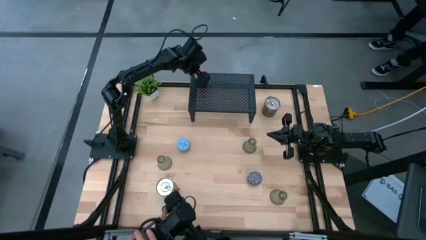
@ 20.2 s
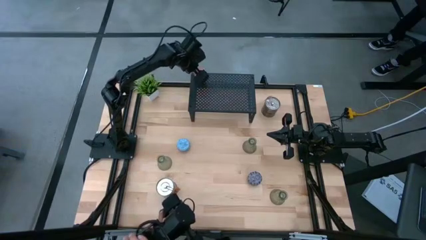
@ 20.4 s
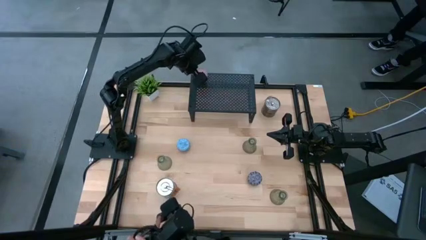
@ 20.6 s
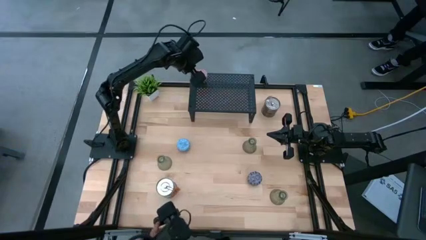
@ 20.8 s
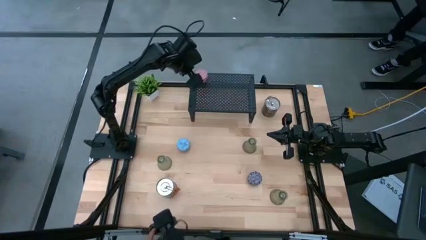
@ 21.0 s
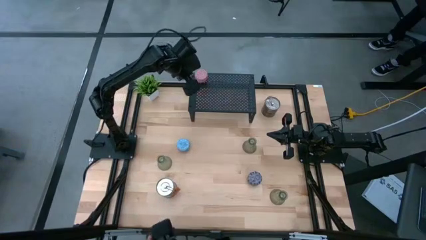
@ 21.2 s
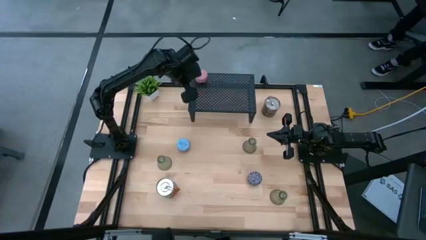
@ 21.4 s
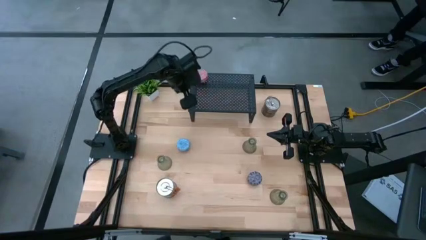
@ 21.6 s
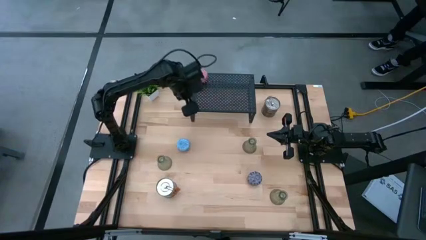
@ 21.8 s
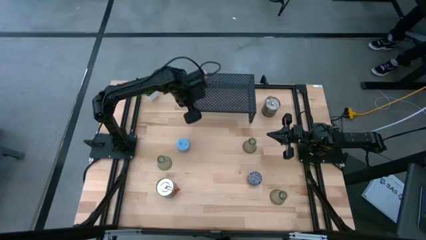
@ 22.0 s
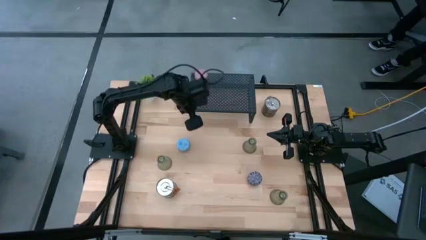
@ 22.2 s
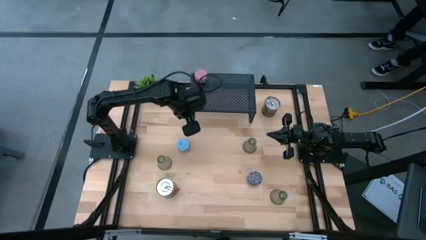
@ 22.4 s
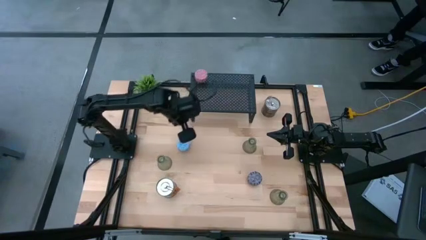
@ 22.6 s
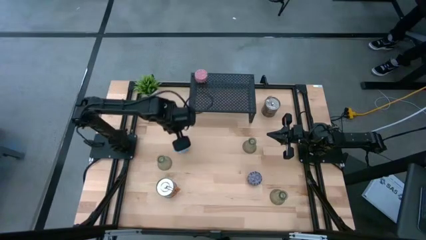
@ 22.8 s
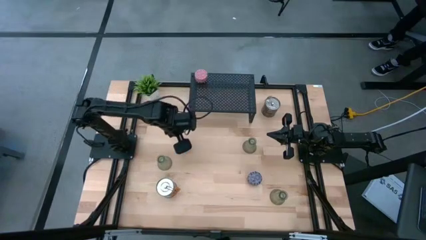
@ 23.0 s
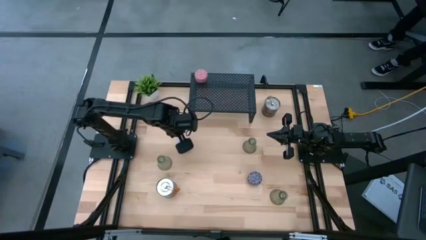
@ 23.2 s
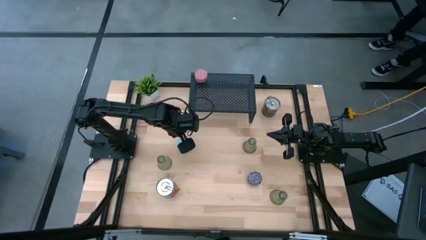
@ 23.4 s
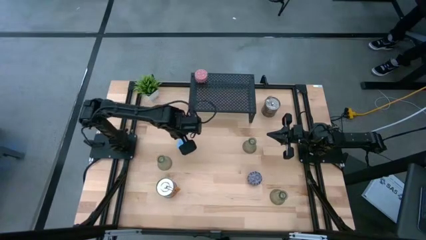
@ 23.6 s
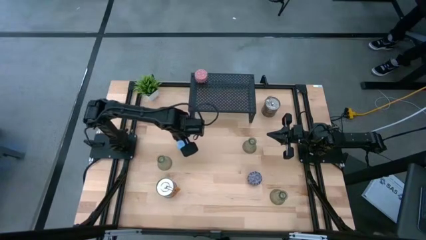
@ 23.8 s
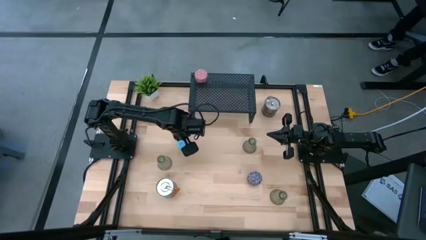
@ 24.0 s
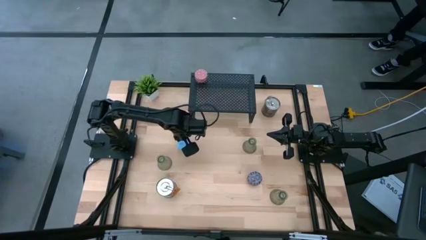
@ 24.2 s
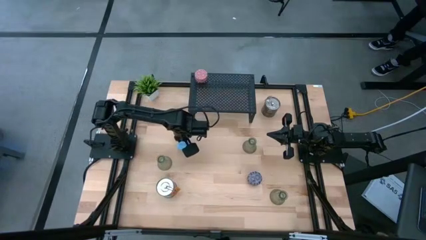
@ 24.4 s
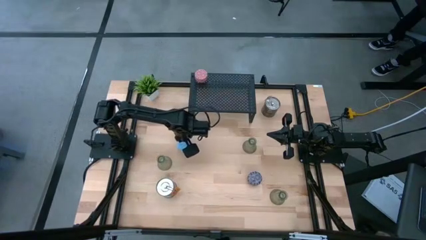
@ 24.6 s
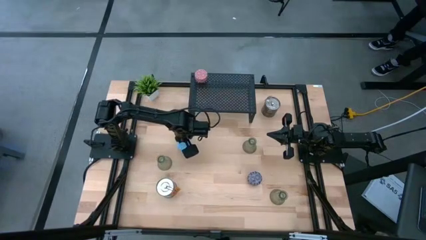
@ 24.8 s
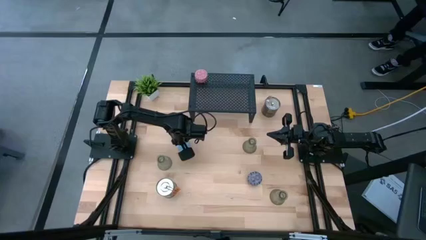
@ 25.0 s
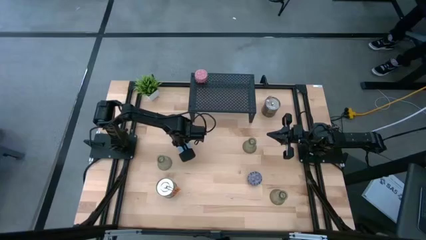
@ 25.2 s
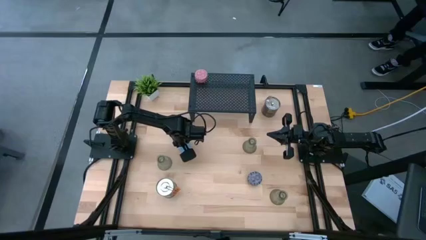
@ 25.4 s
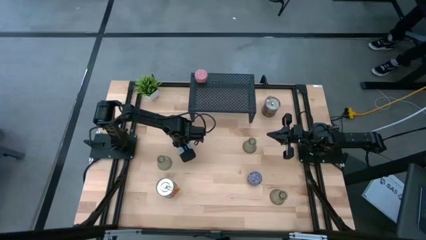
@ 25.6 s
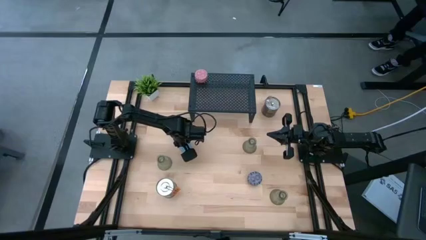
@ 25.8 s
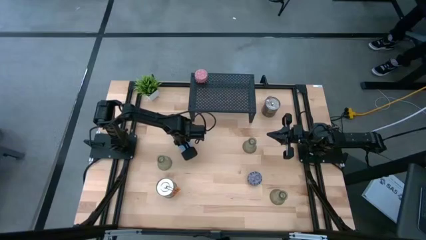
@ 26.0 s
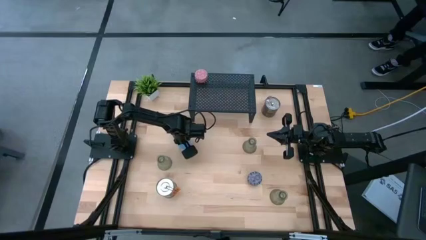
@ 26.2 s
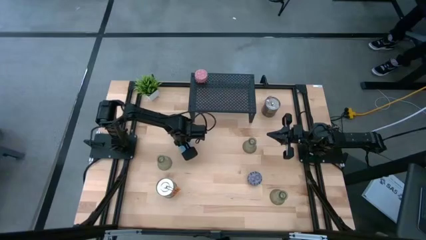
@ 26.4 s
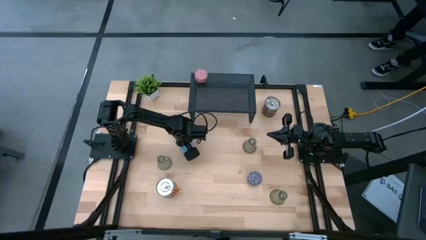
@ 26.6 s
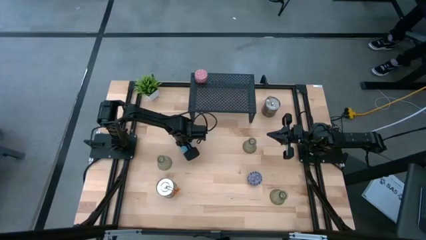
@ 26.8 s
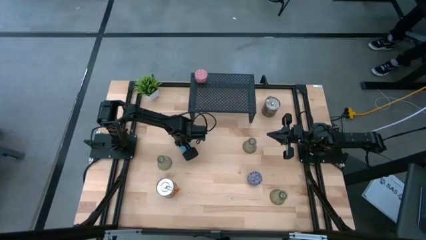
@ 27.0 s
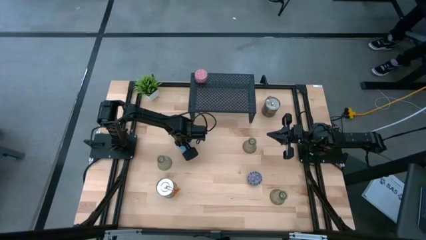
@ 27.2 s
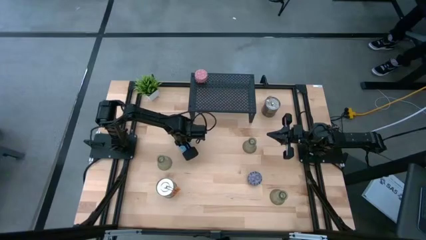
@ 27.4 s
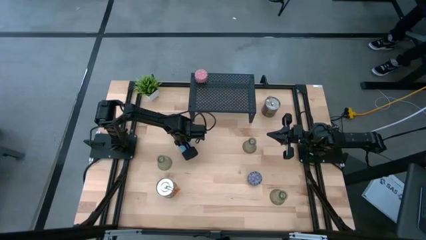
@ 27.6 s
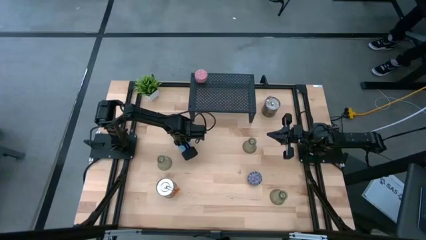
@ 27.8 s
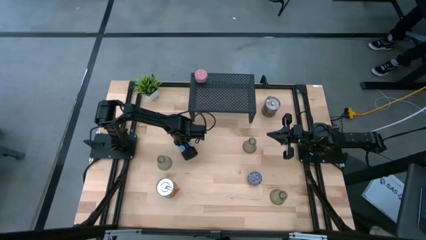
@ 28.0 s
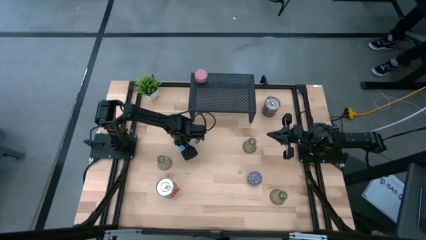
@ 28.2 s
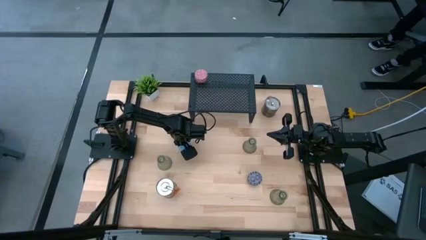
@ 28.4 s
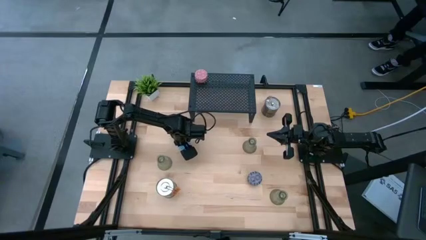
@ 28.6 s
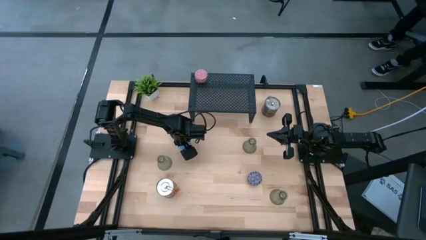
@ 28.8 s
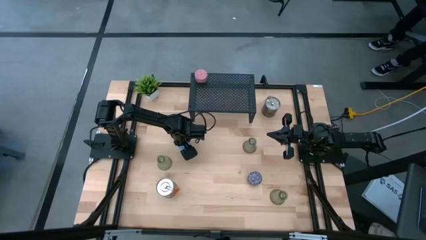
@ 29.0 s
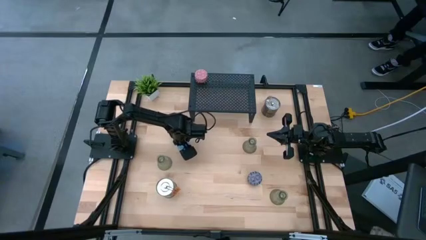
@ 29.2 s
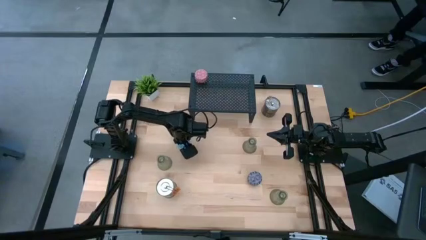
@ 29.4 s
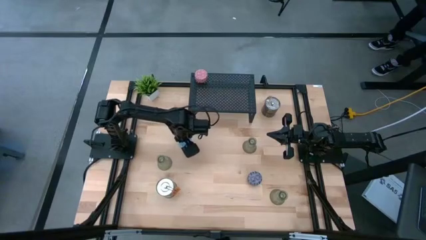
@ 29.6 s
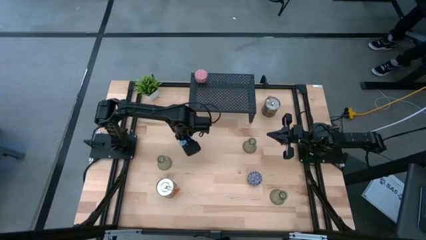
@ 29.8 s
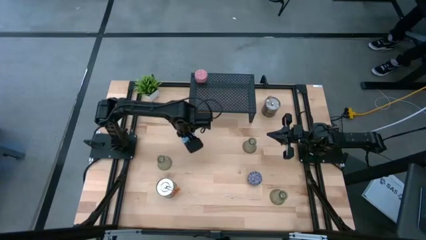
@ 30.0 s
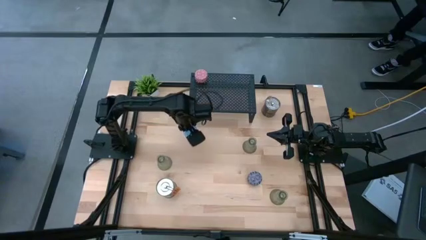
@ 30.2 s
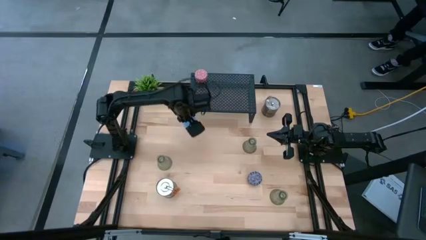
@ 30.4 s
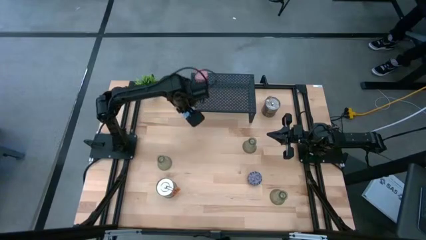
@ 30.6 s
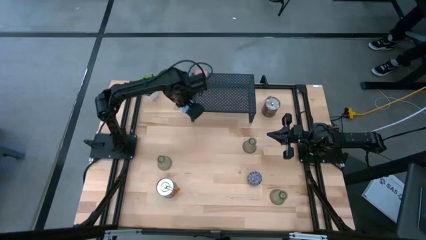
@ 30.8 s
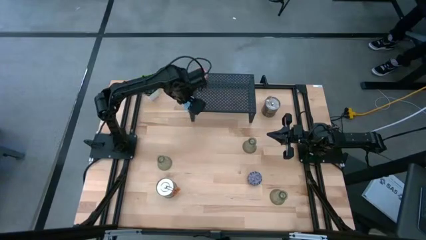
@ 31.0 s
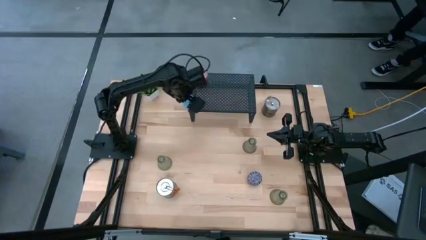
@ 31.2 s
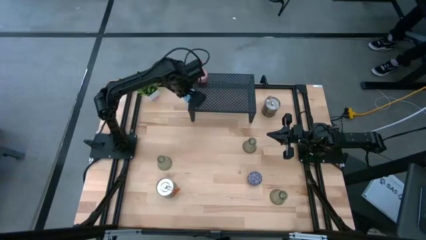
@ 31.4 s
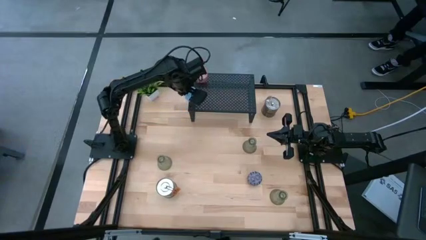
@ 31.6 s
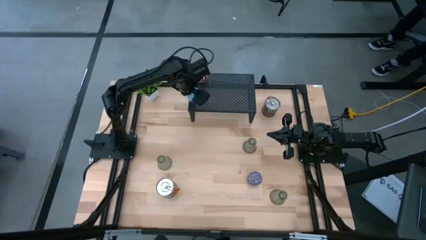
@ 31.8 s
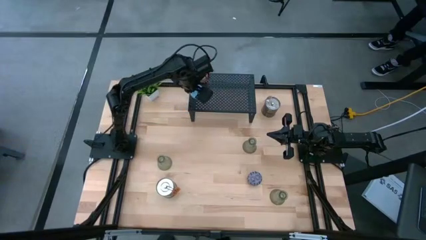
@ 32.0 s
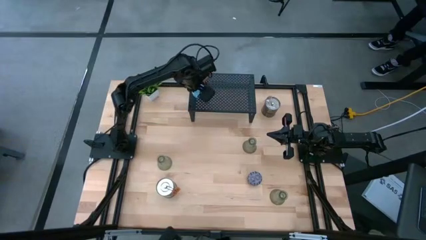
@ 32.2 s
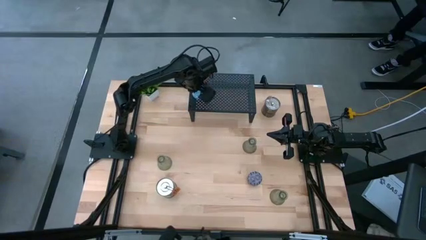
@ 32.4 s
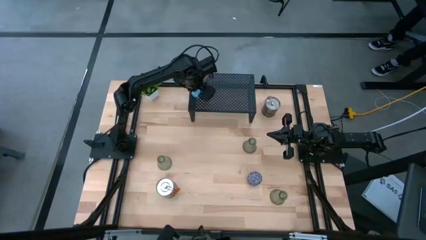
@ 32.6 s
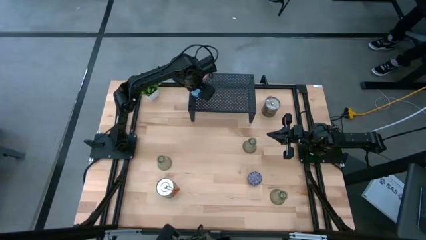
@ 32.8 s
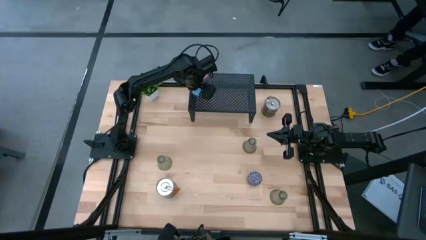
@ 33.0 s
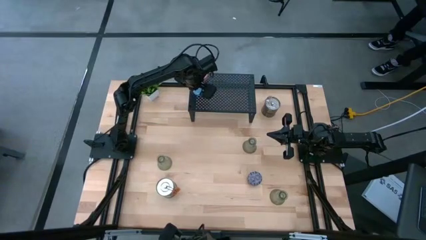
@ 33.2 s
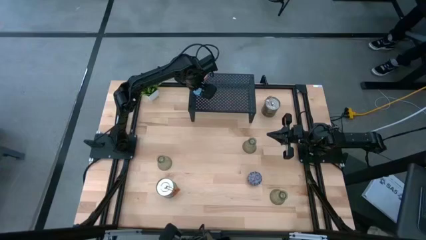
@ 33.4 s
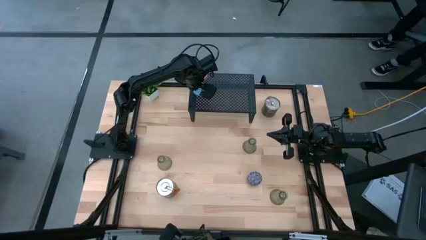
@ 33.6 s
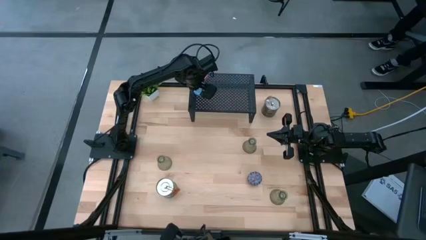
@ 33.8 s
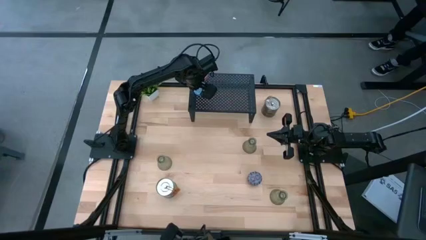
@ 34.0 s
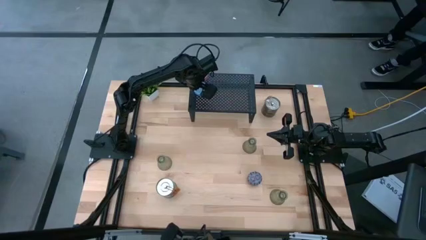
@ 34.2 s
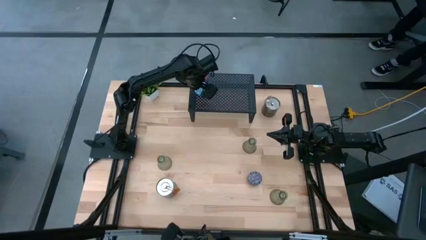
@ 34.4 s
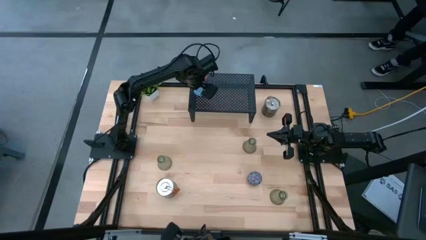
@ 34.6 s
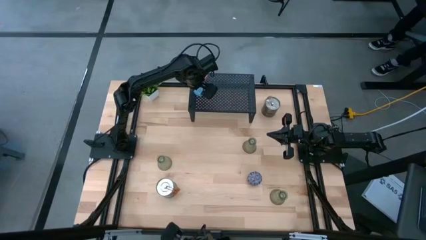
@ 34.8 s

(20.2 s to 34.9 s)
Task: Pick & Place candle stick holders
Put the blue patterned scented candle on the shelf
